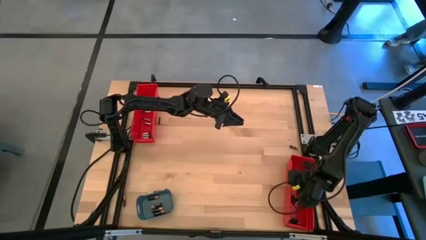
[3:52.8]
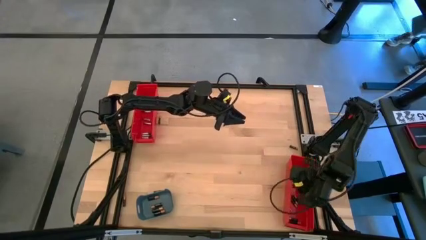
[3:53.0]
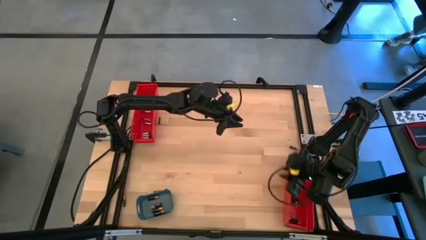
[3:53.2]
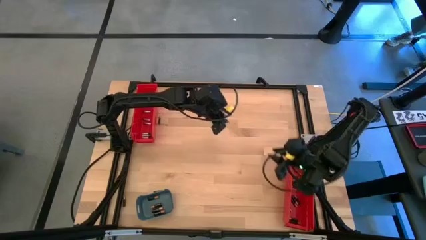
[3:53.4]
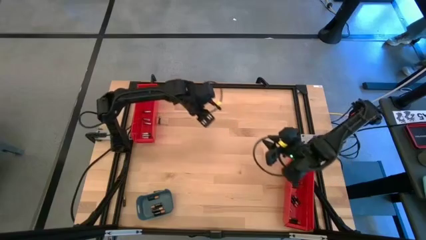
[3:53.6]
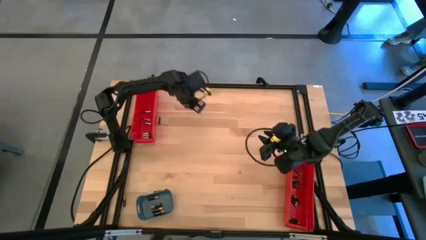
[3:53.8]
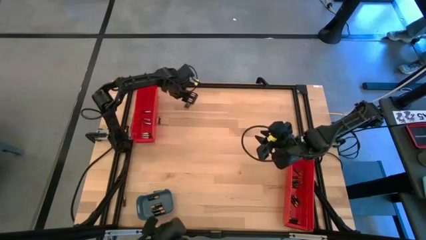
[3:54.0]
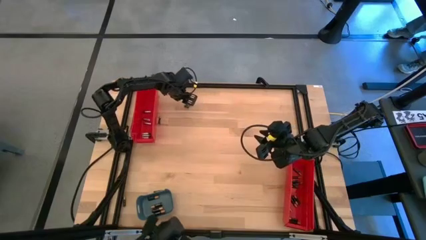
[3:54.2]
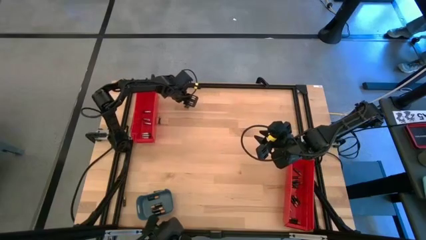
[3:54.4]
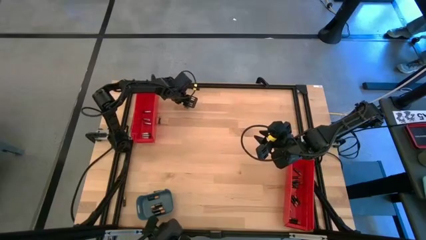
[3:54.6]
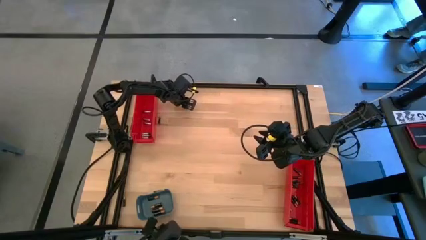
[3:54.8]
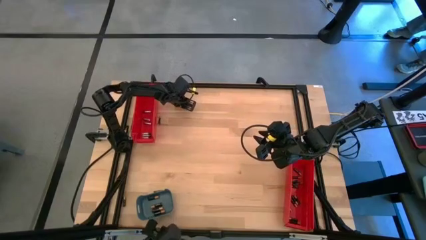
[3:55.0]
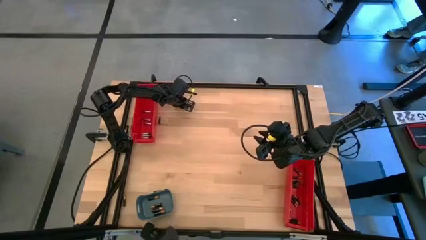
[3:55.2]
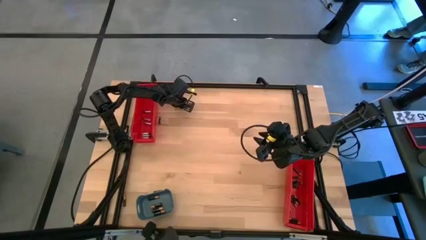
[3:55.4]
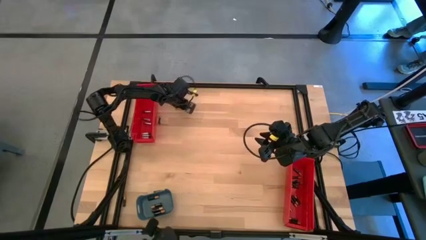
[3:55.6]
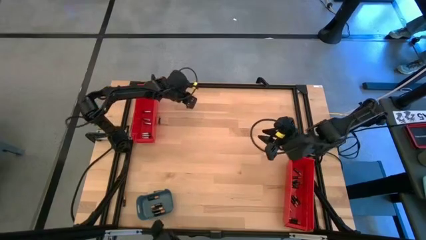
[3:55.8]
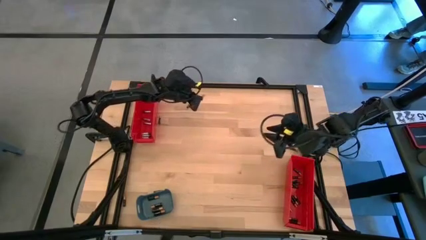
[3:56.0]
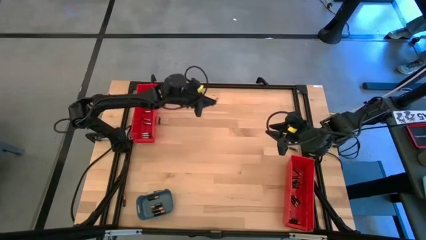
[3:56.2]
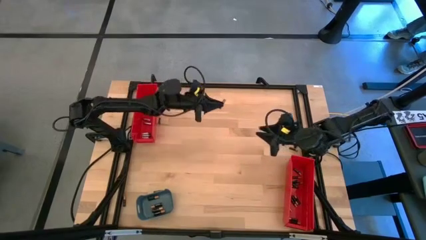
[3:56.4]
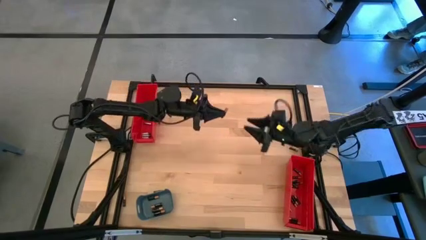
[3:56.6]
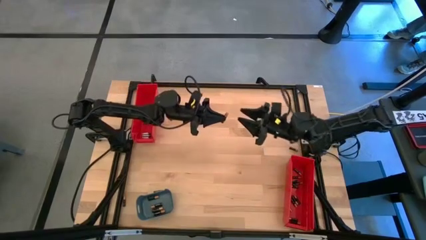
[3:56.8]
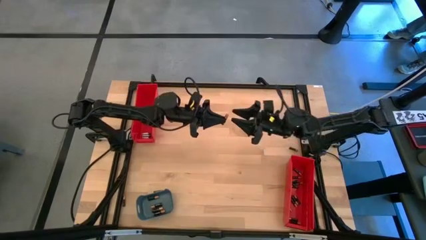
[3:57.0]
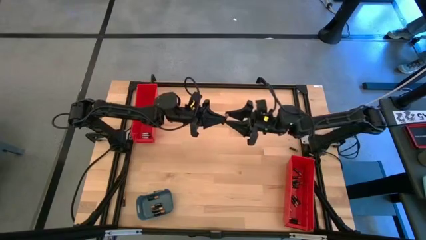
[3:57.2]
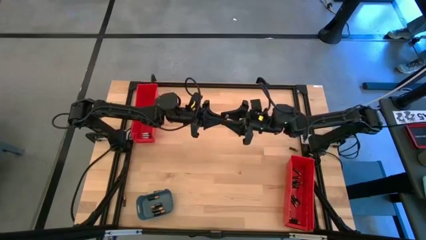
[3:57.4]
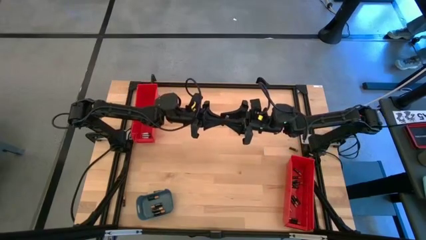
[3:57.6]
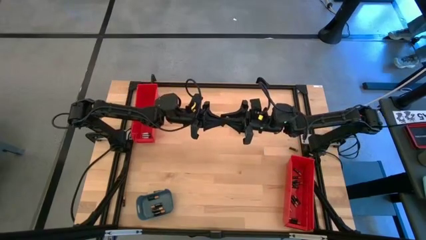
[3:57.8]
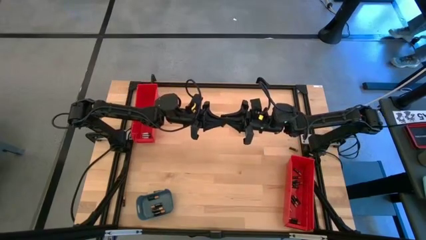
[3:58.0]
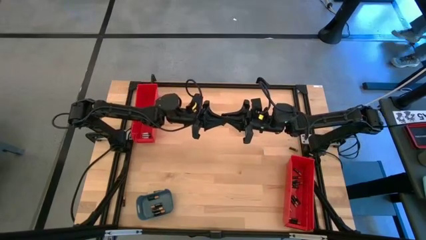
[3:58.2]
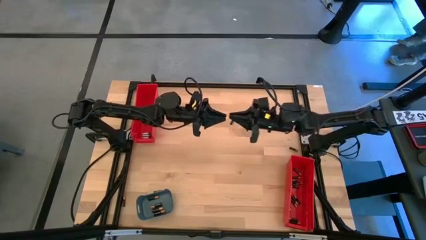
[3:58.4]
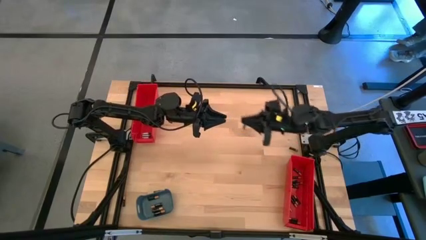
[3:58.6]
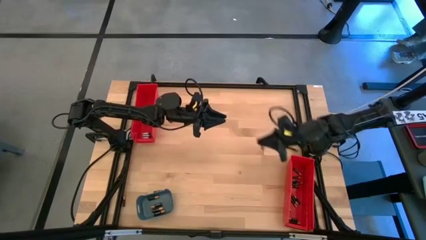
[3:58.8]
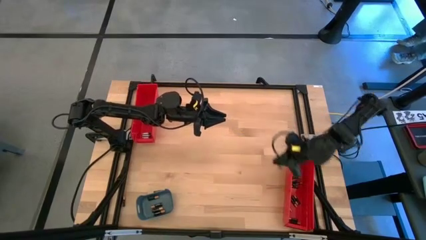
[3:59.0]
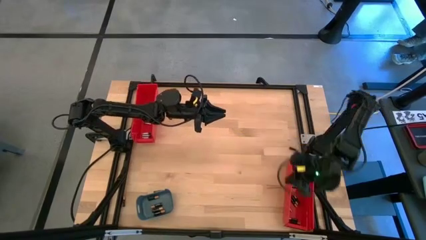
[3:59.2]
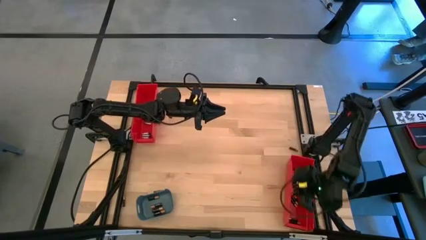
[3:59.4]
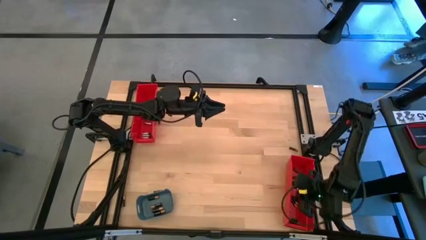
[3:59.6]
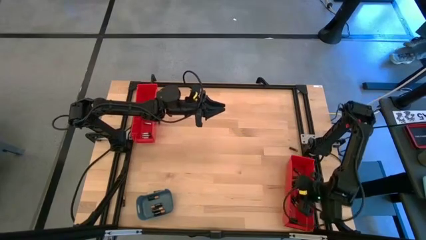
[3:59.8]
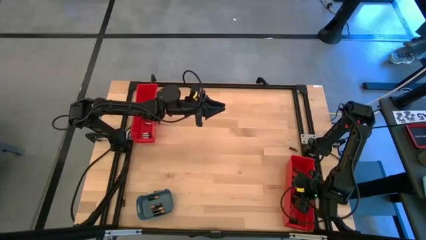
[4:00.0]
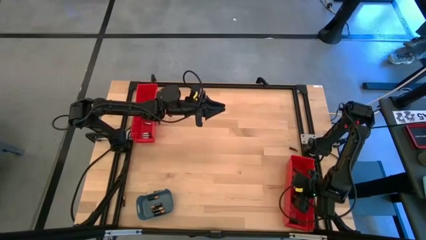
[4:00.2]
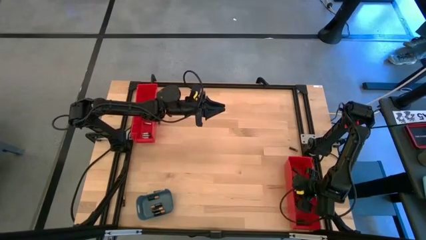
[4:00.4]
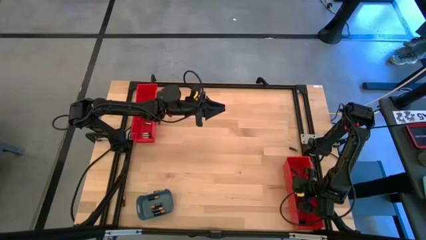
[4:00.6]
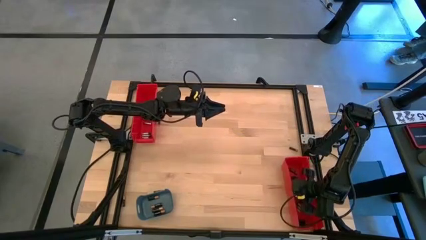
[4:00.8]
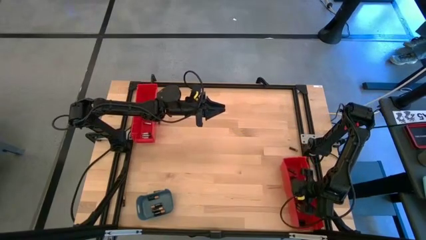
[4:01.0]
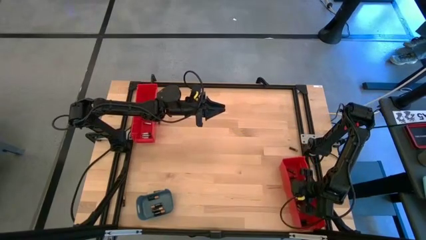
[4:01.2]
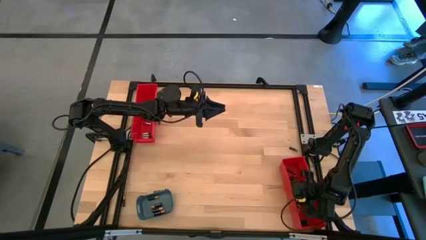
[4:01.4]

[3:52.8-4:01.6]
Task: Sort batteries
Put the small black battery into the bottom red bin

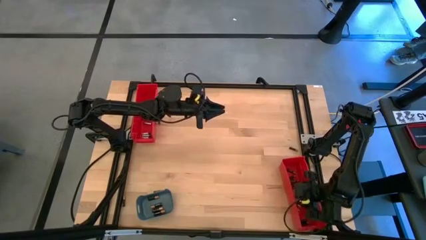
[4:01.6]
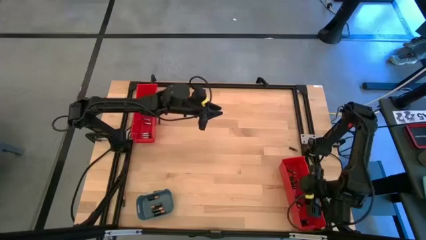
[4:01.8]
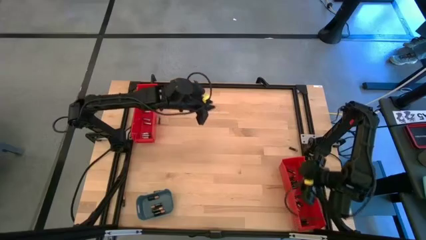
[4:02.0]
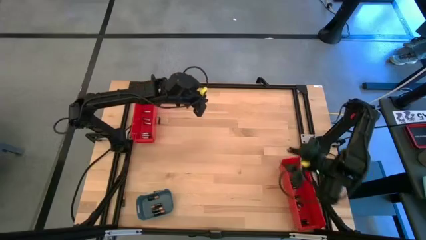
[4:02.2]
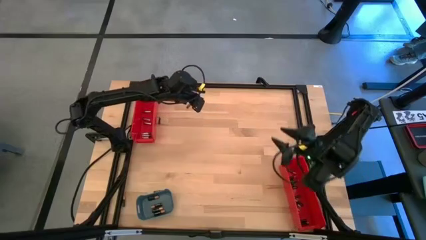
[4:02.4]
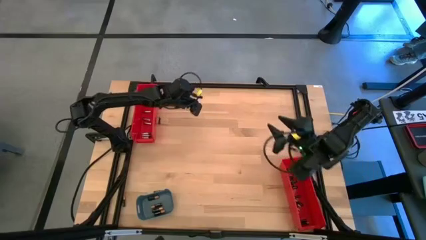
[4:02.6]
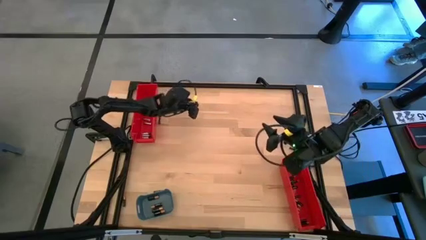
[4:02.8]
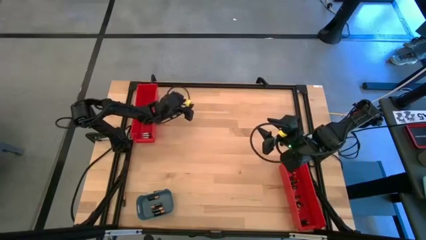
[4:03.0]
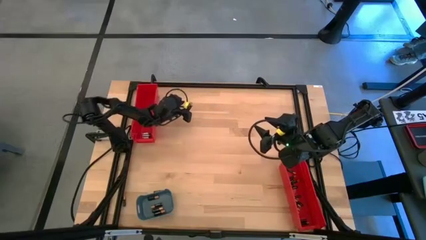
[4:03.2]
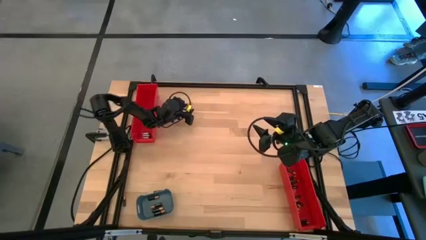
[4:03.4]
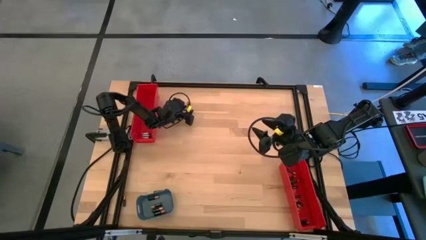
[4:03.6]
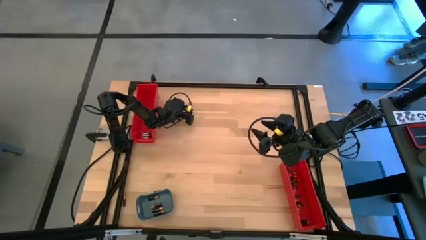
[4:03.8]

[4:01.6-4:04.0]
Put the small black battery into the bottom red bin
